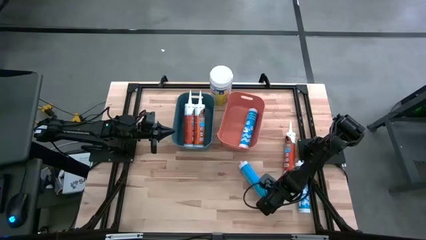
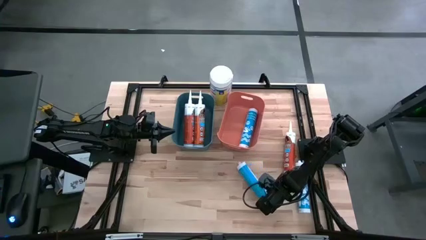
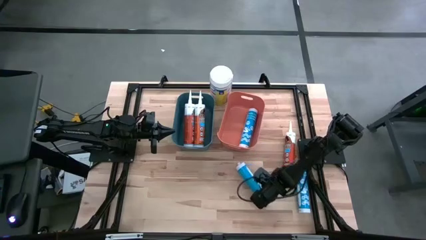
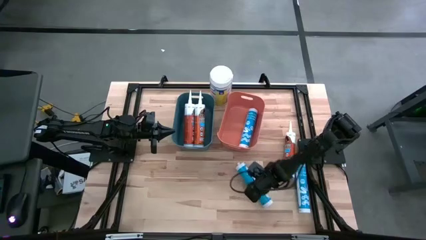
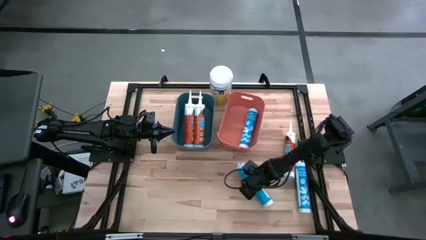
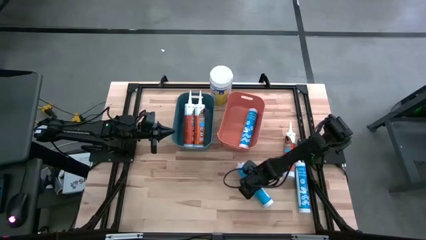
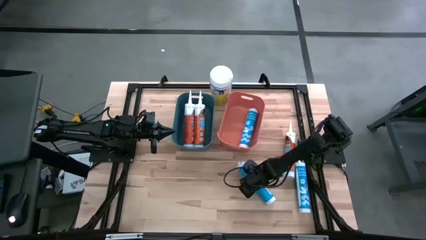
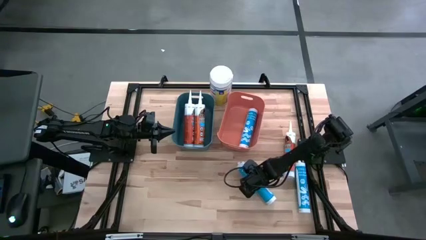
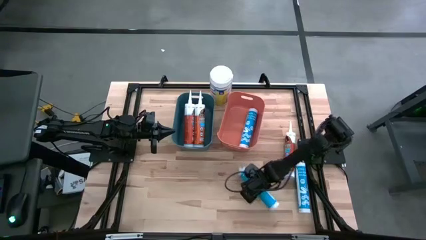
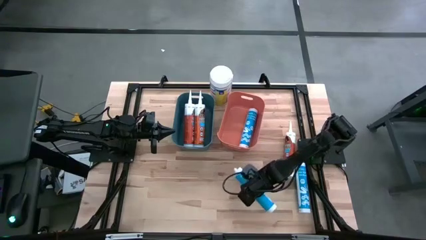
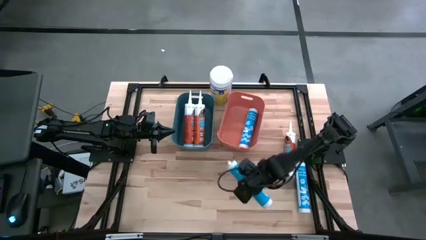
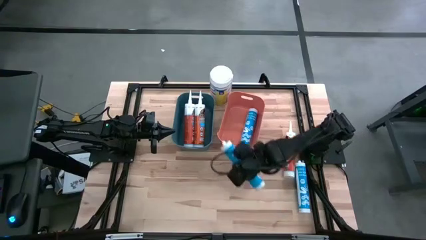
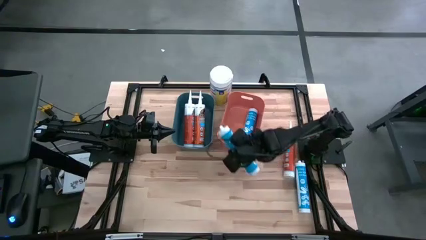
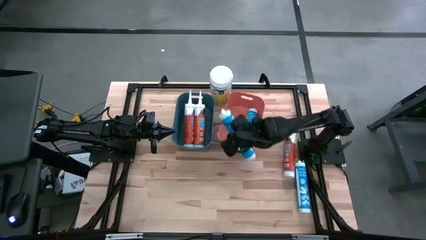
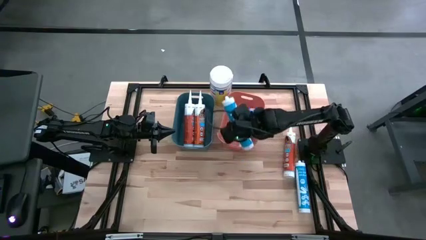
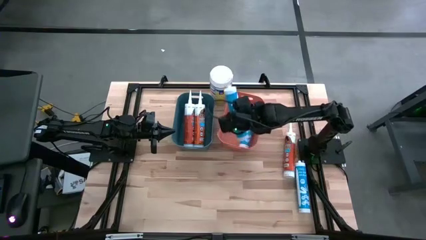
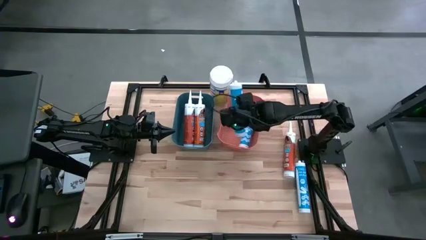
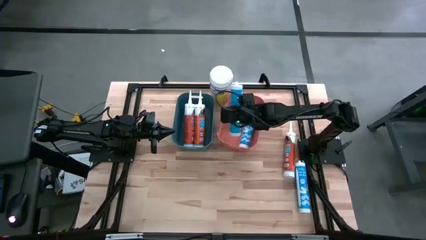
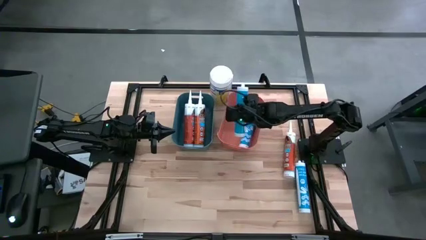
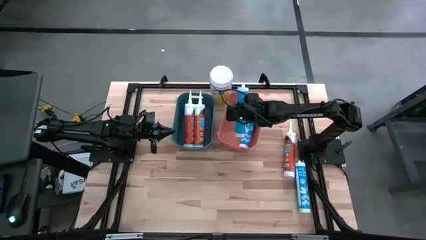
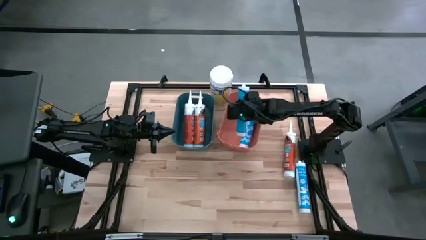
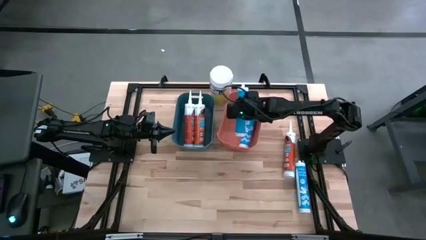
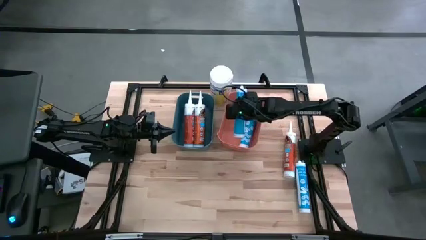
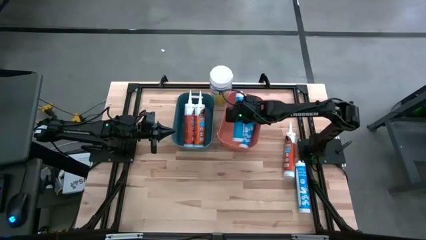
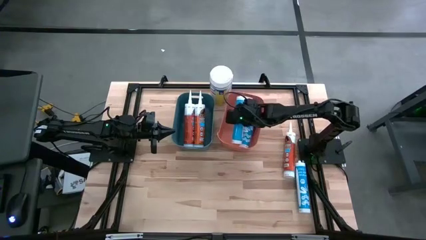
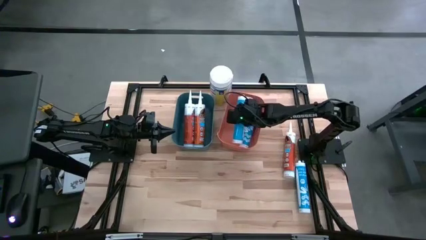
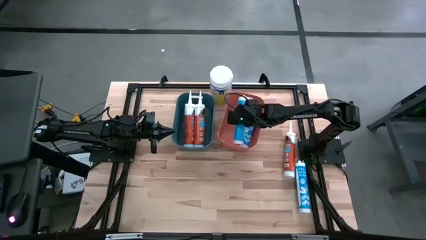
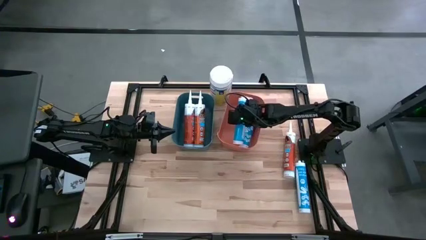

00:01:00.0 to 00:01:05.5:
Task: Pick & place silicon tubes, Sealant and Lysol wipes
Put the top blue sealant into the orange bin

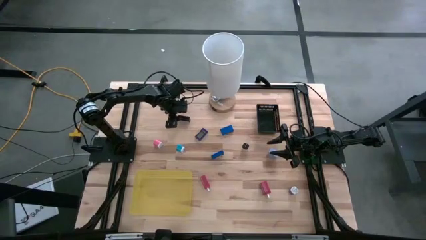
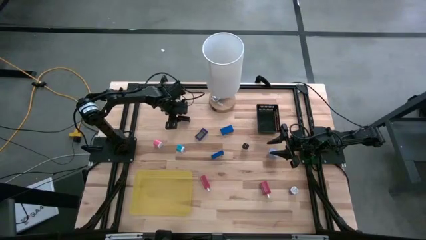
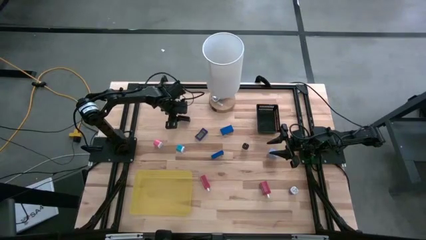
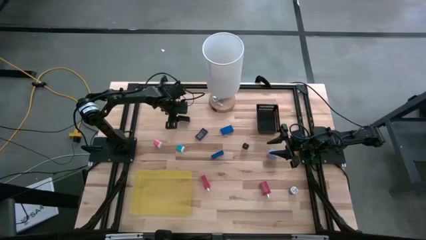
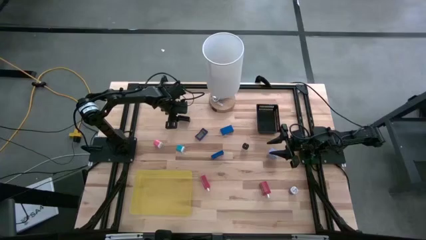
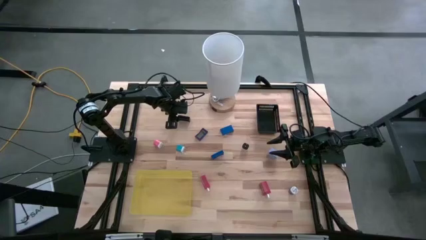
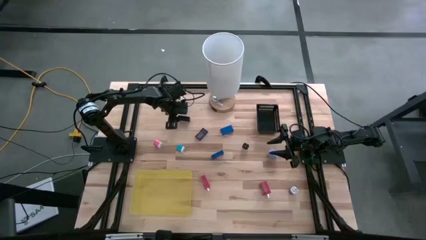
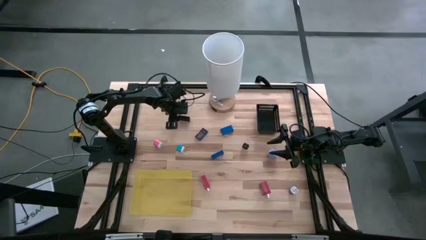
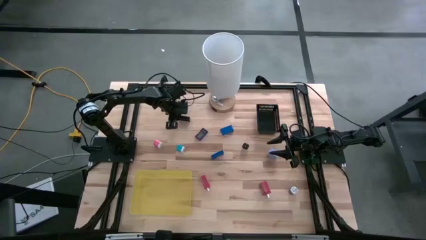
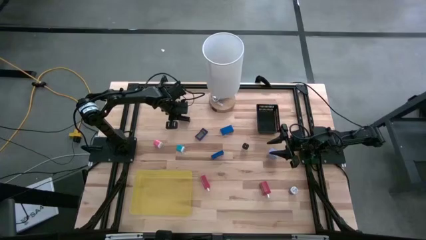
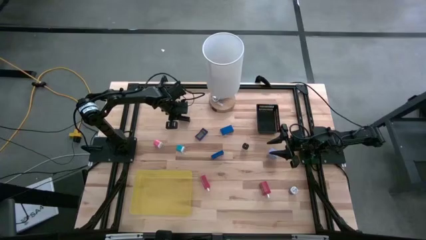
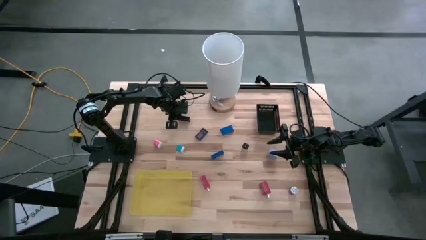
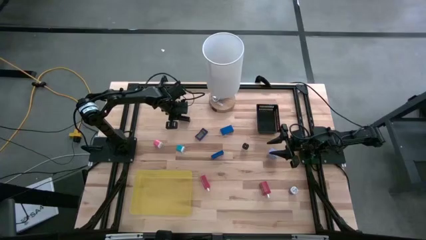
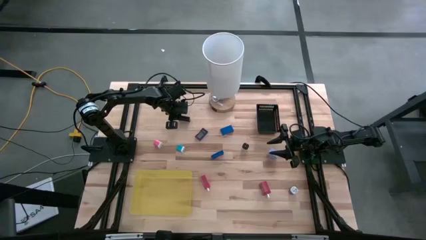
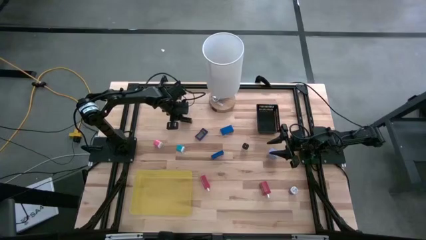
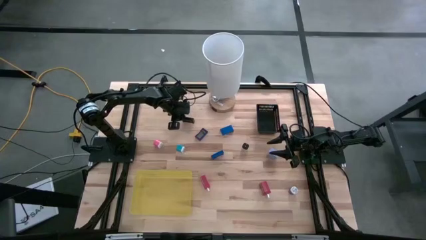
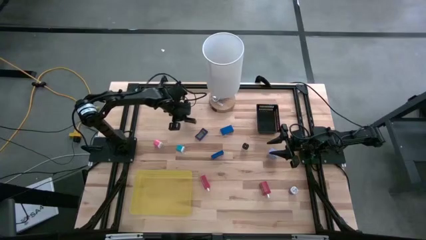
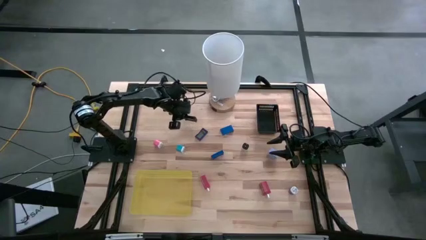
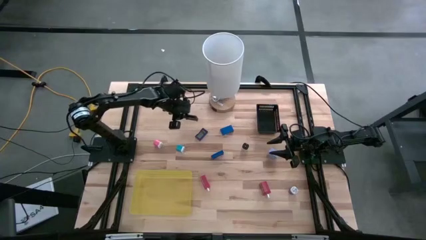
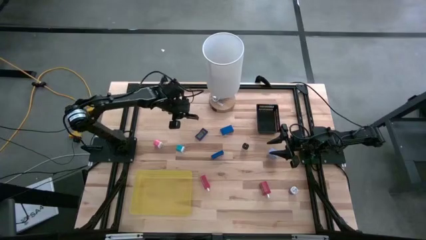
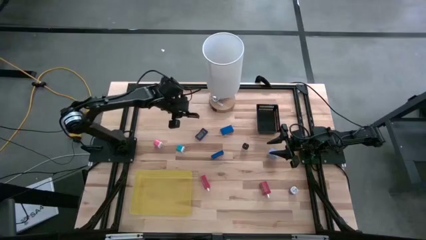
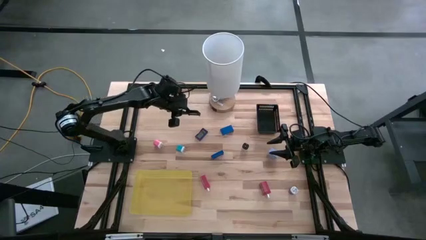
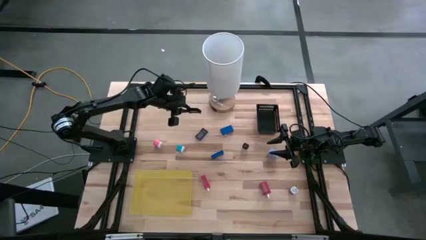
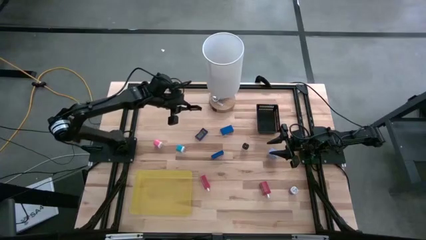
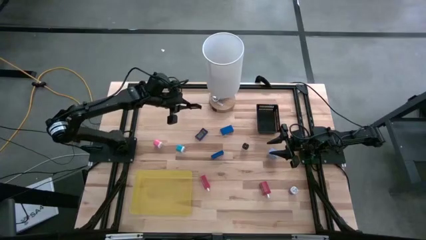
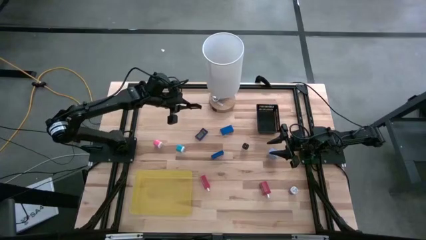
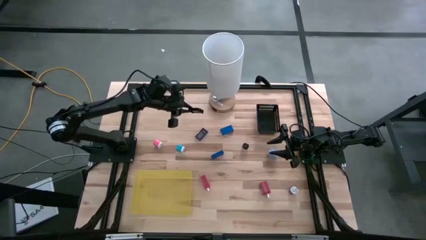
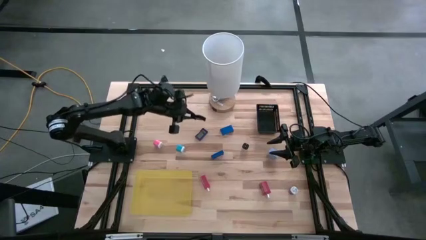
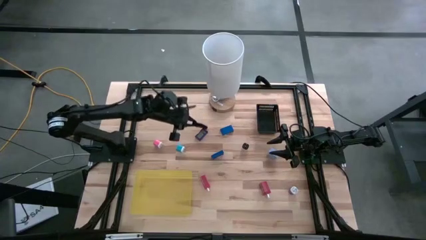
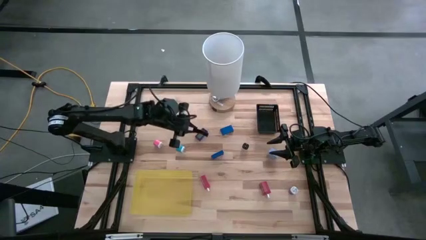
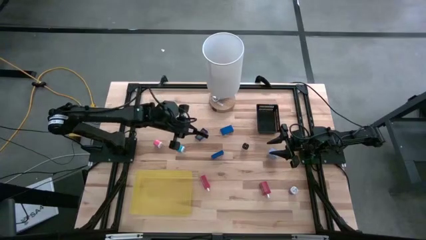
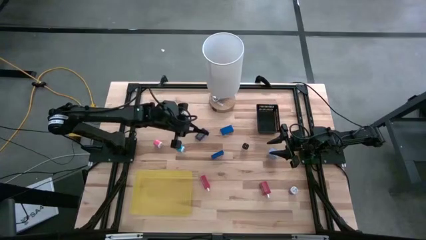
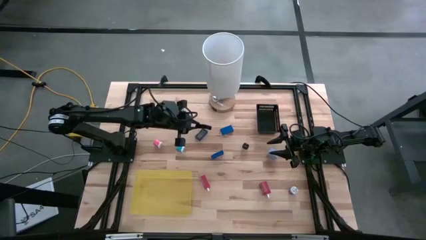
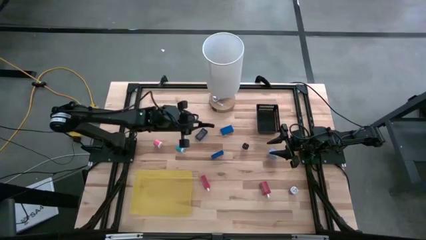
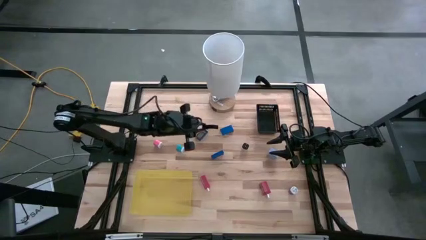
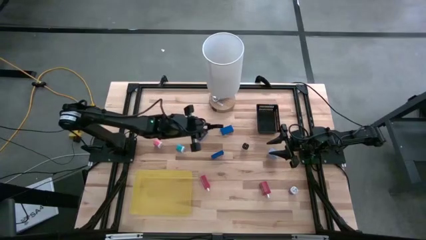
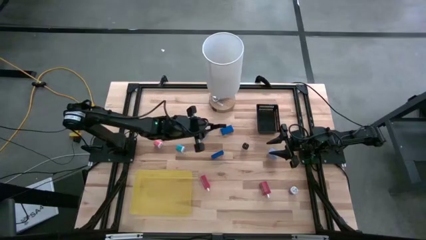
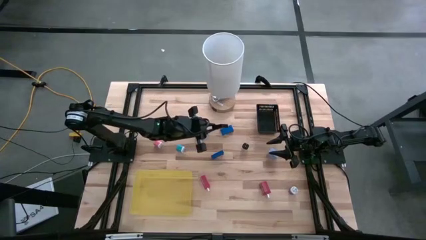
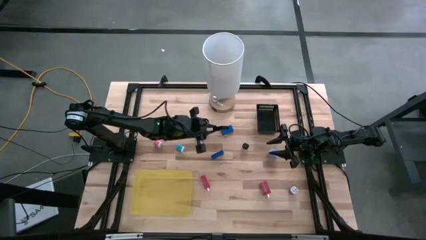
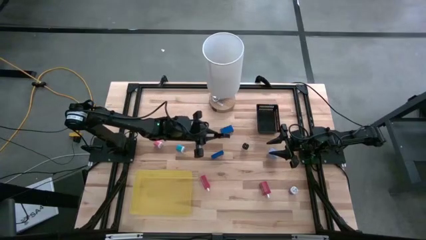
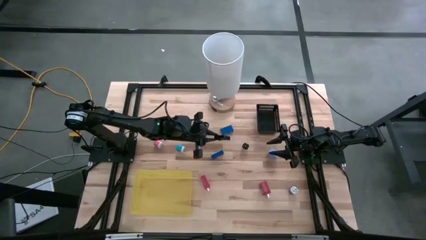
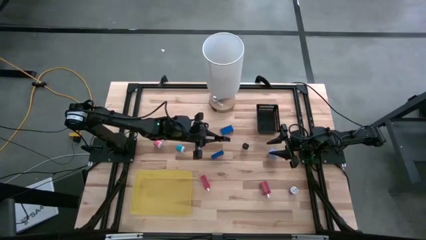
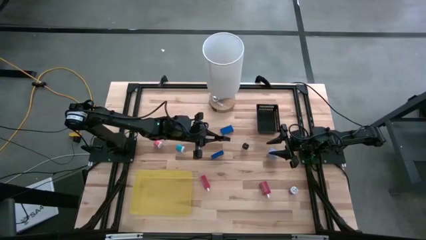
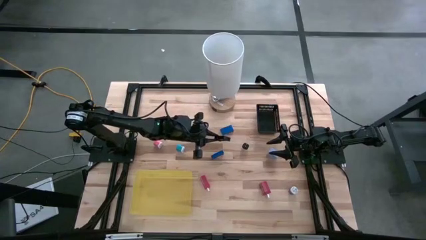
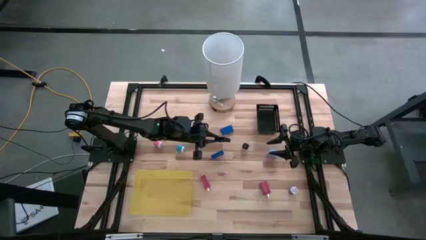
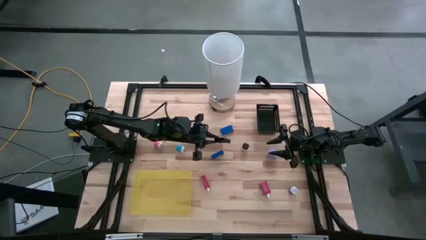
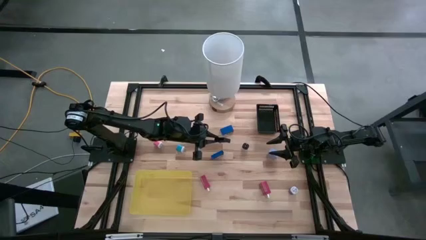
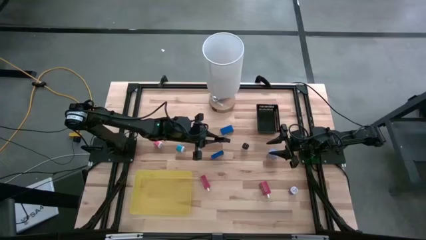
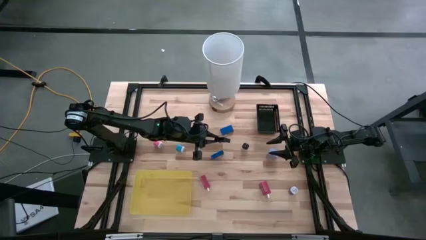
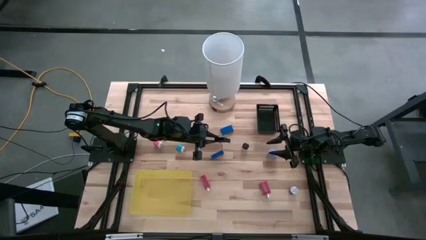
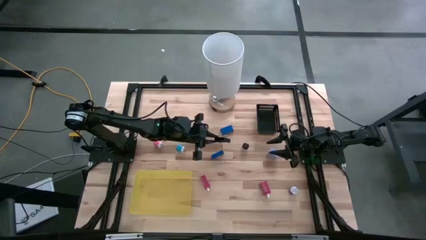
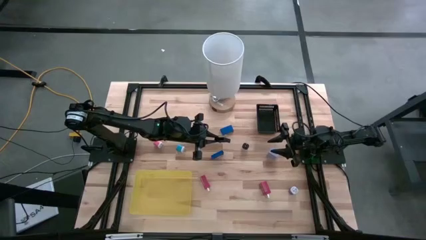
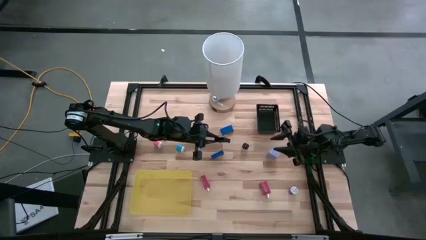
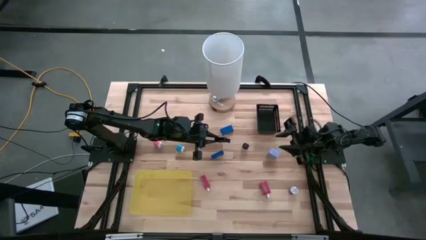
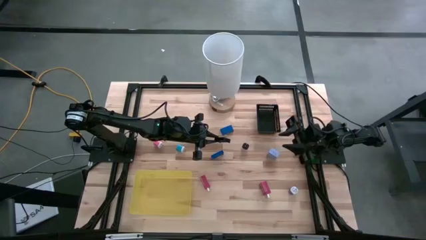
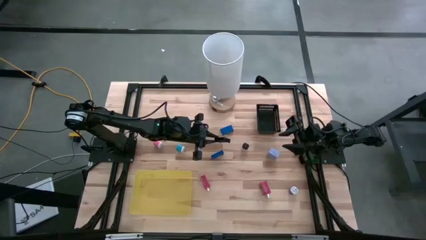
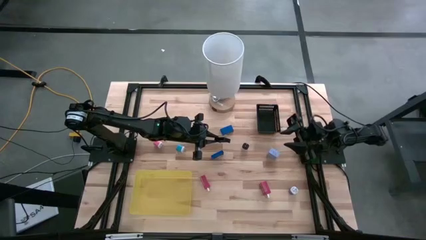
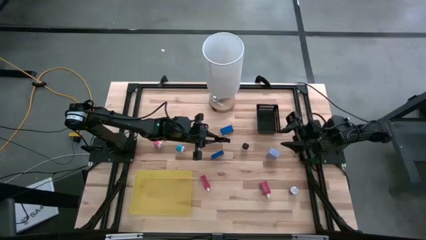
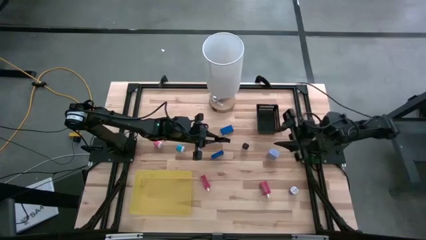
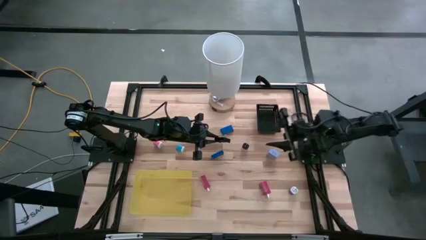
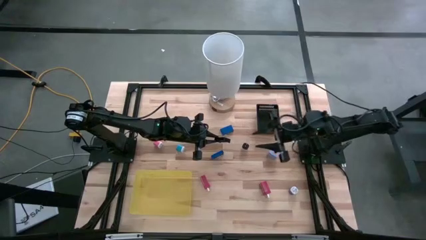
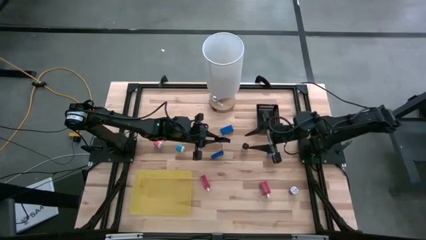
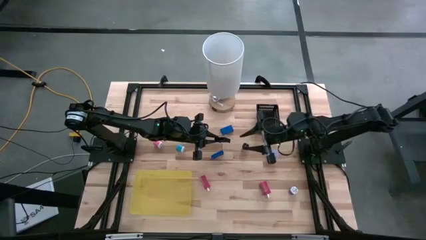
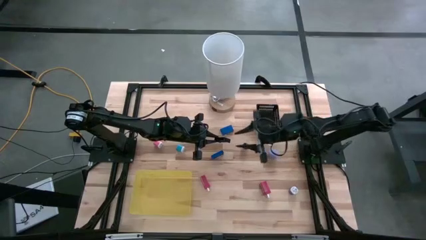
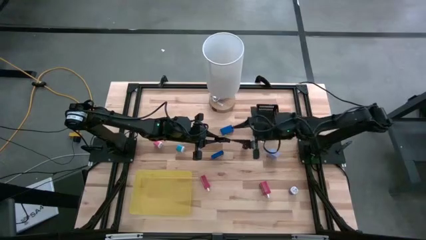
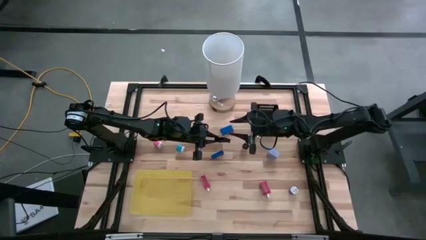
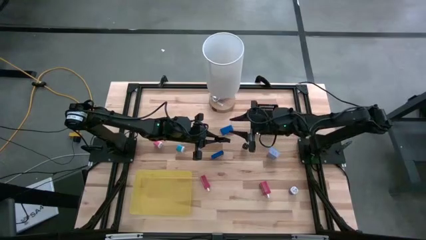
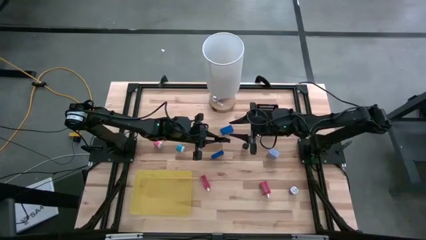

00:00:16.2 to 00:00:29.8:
Task: Pick & Place Office items
Put the black digital clock into the black bin
